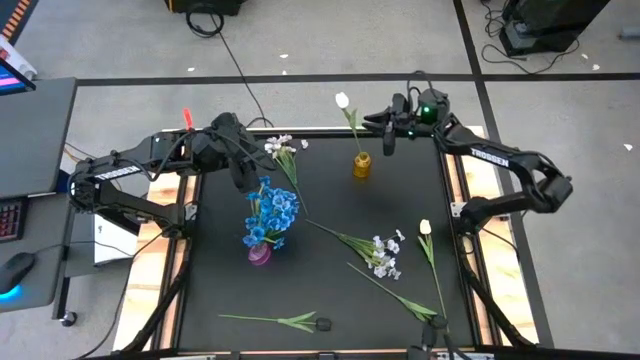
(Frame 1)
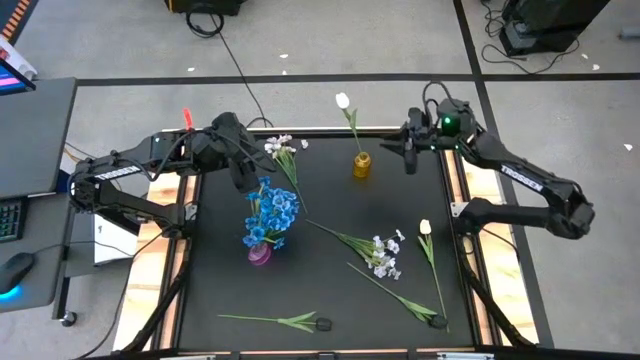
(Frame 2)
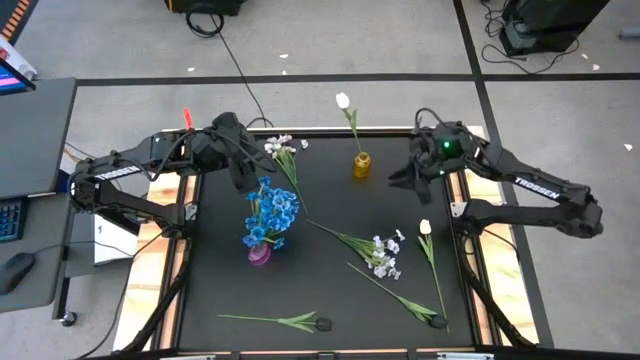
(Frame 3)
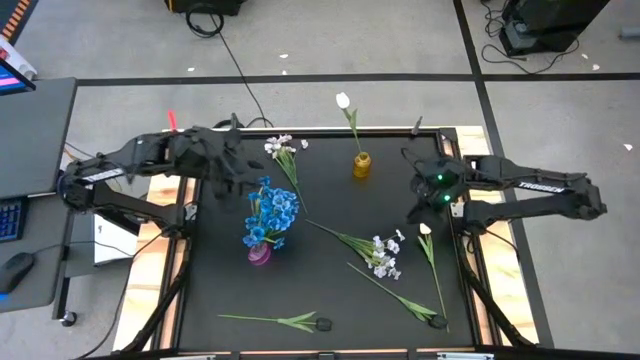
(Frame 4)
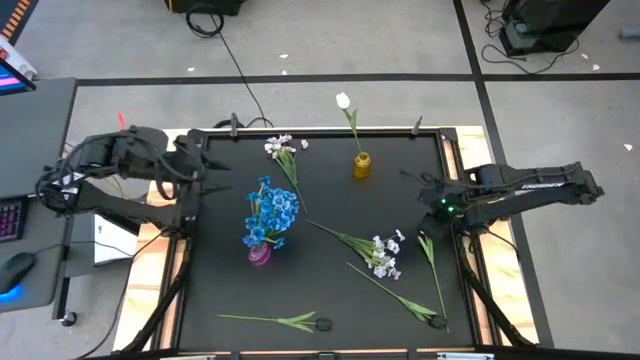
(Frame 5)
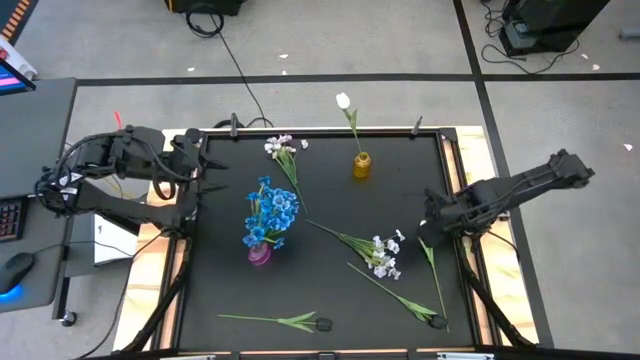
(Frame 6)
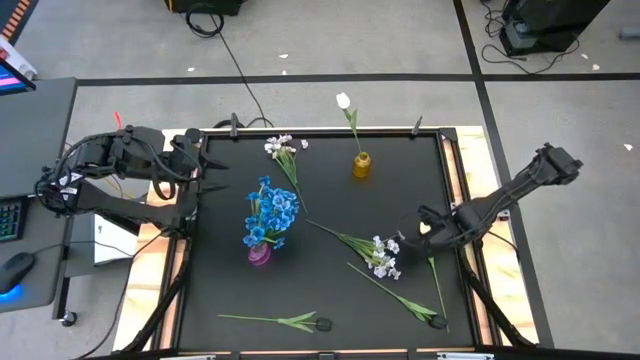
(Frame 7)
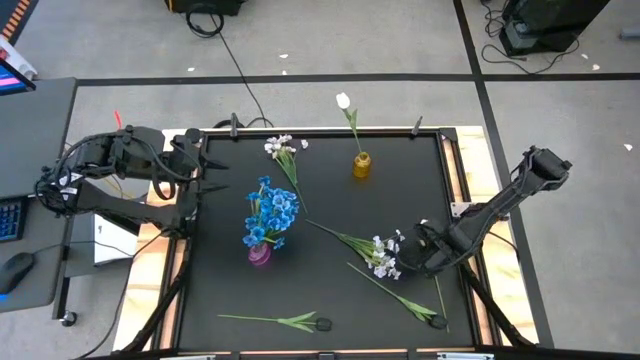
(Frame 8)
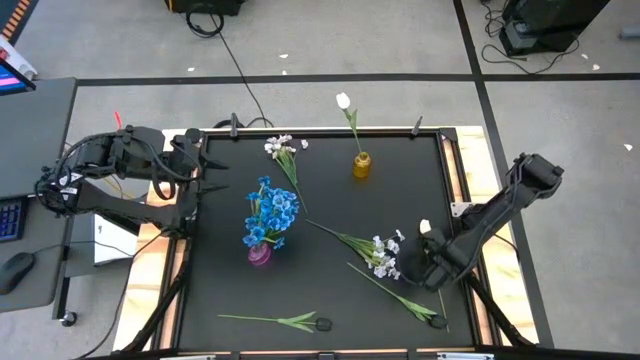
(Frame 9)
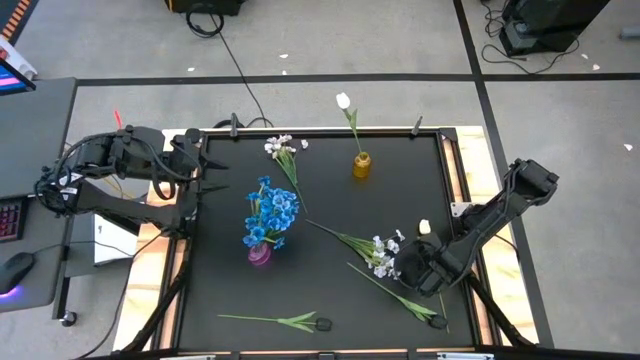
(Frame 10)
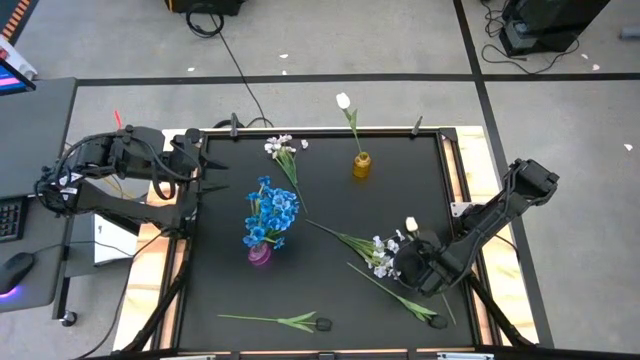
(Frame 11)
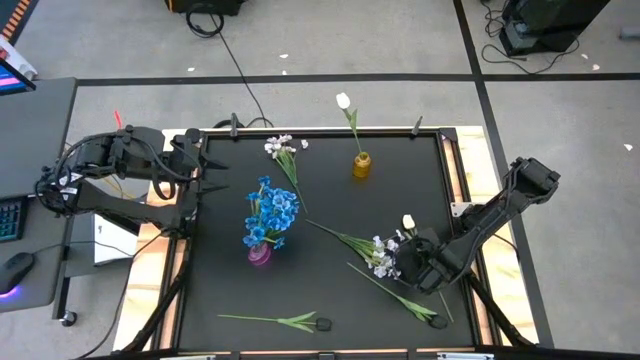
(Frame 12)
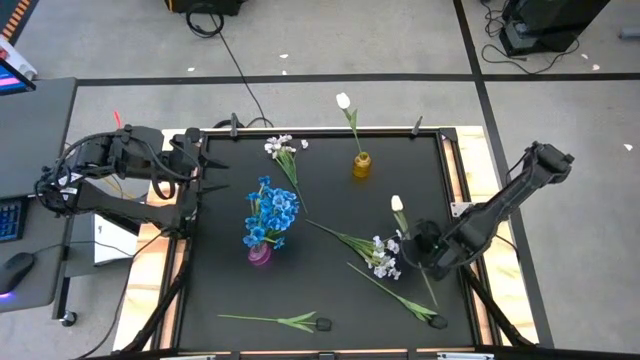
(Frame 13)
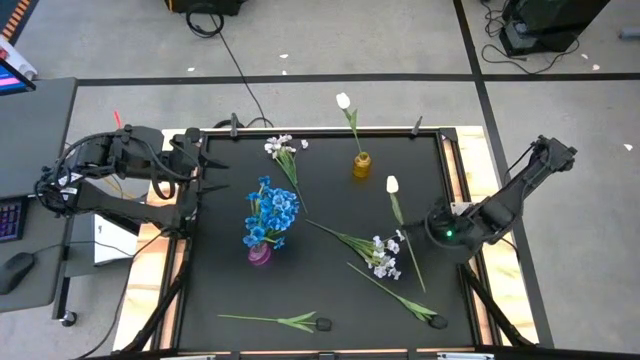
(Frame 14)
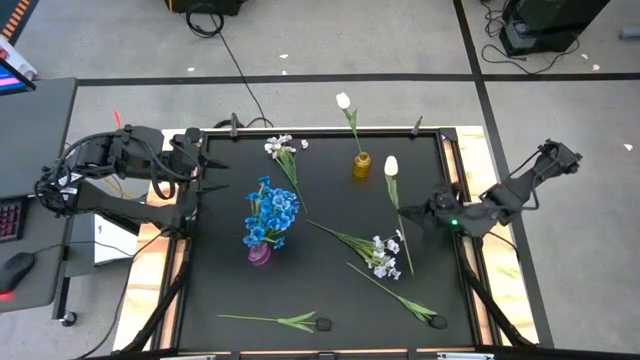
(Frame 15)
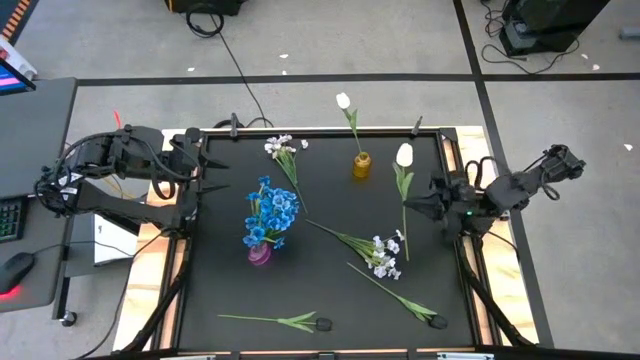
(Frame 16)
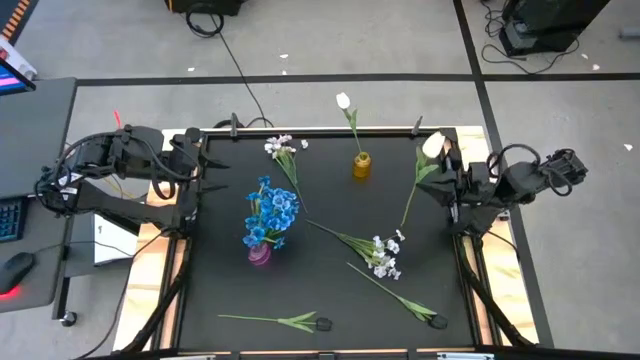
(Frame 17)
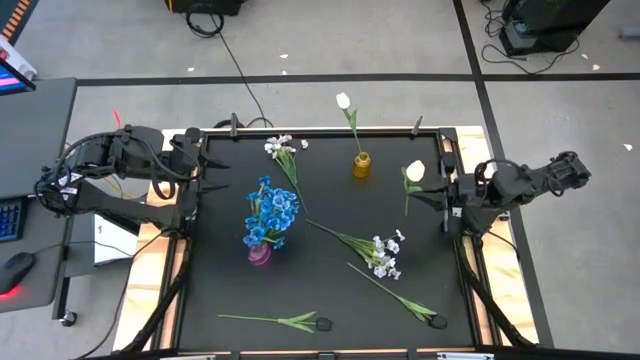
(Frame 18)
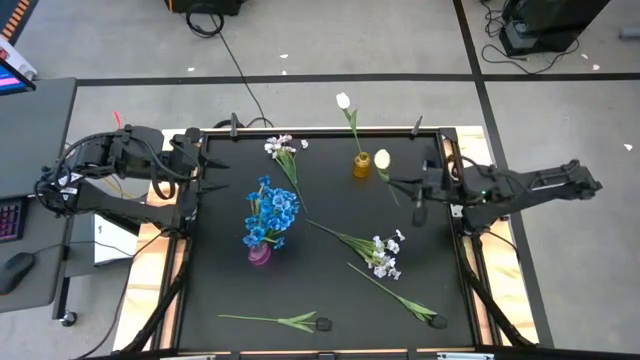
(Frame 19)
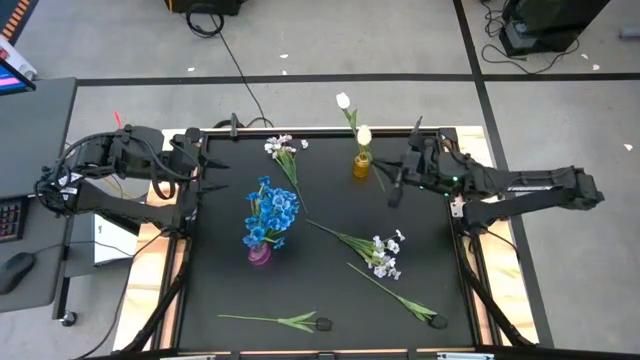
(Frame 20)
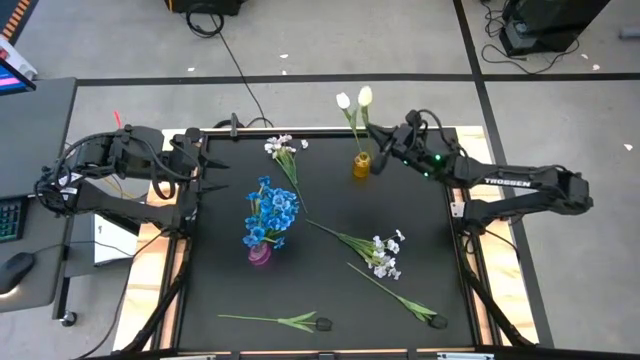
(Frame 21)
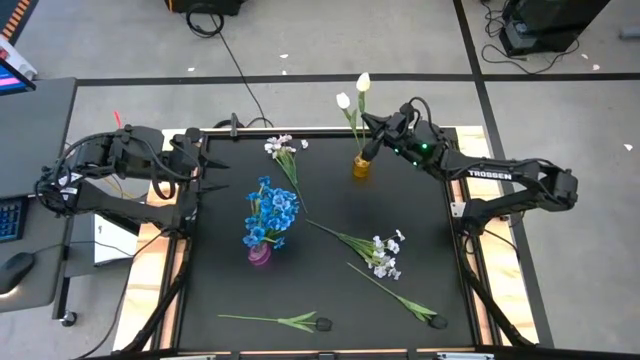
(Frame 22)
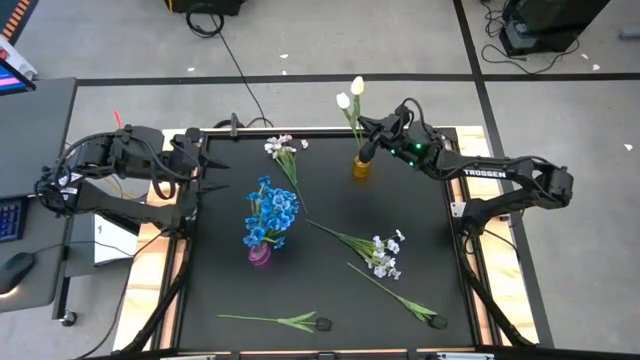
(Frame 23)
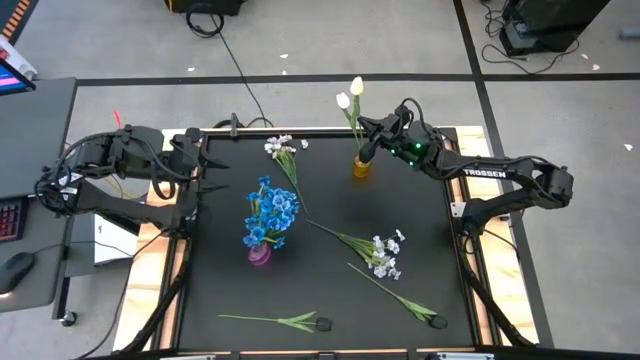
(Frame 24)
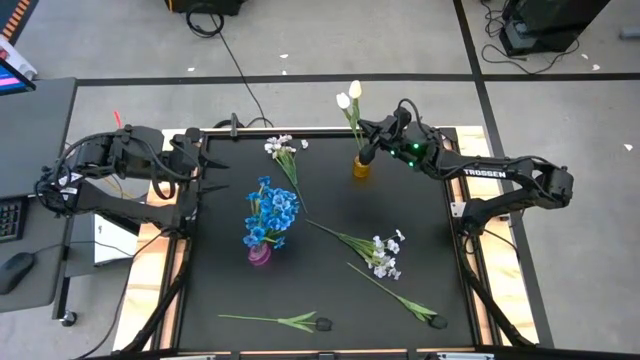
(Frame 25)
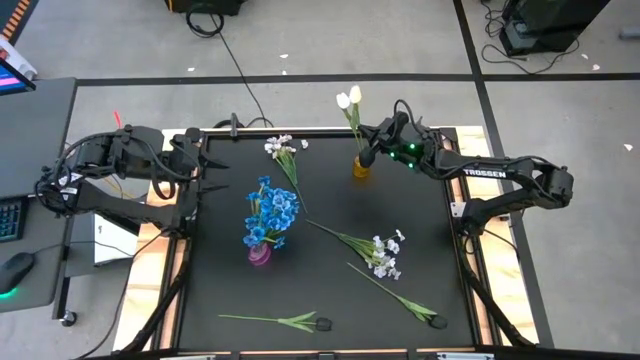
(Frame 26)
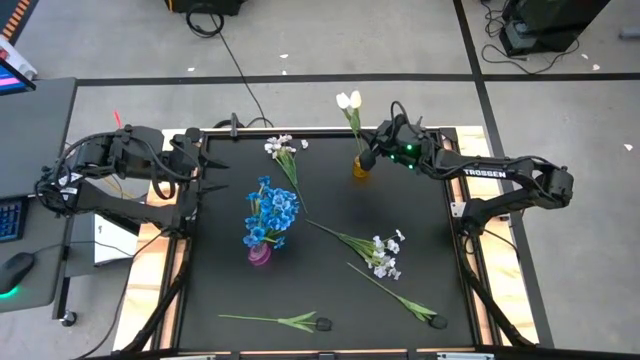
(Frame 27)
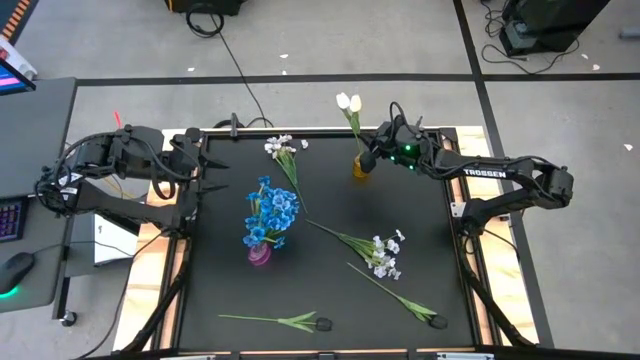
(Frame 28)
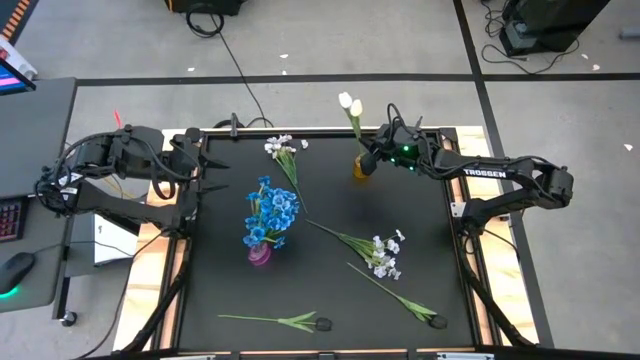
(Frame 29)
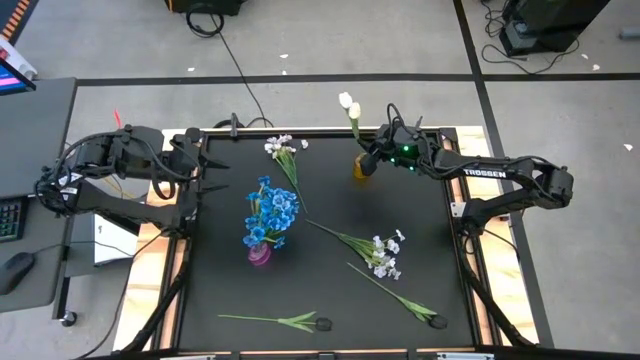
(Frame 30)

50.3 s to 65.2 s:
Task: Sort flowers into vase by color
Put the white tulip into the yellow vase
